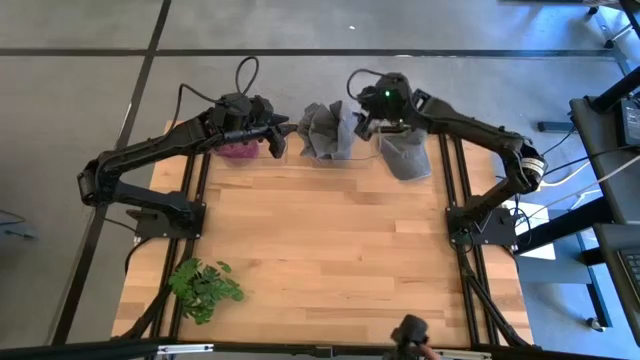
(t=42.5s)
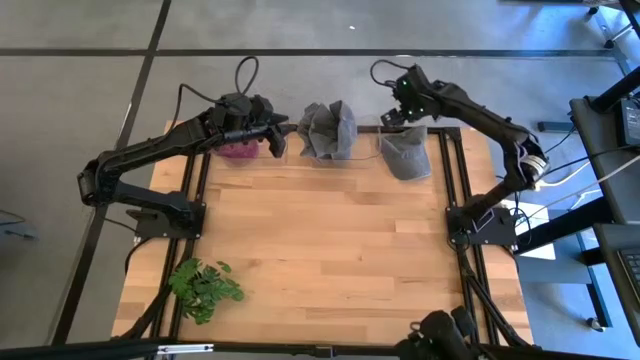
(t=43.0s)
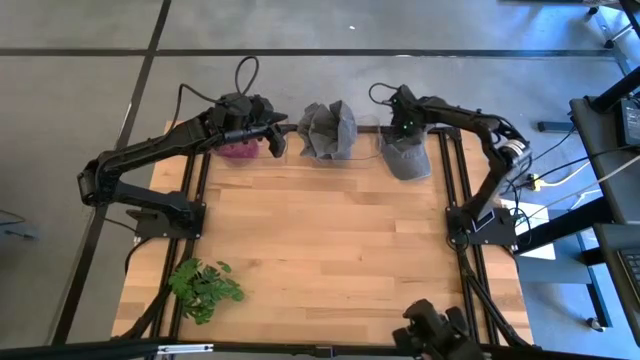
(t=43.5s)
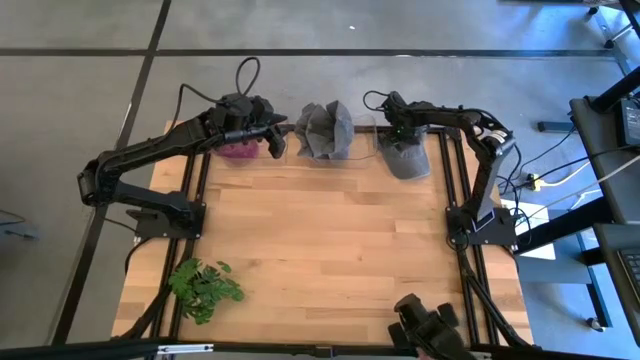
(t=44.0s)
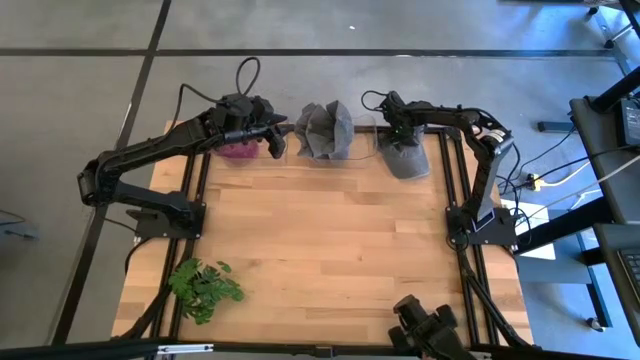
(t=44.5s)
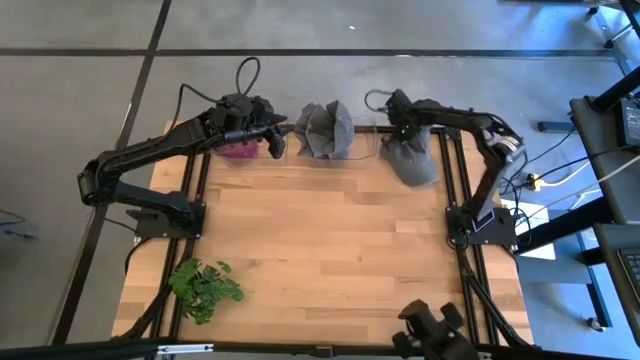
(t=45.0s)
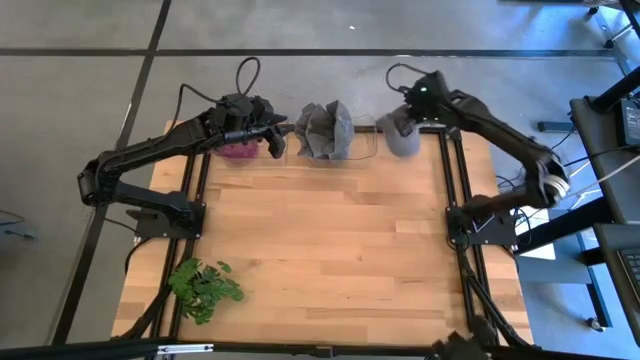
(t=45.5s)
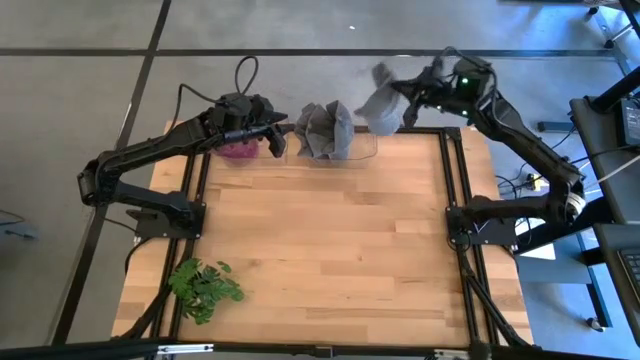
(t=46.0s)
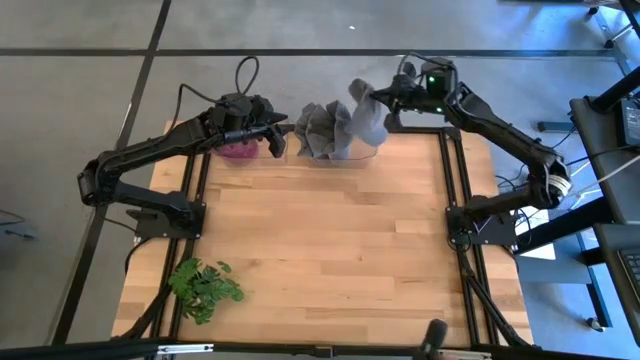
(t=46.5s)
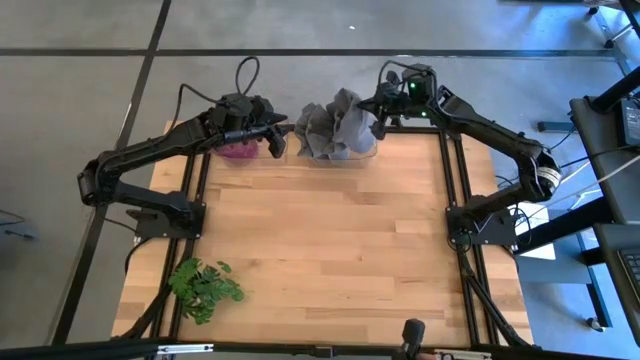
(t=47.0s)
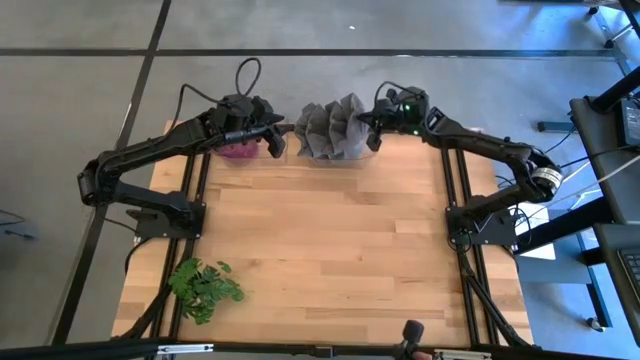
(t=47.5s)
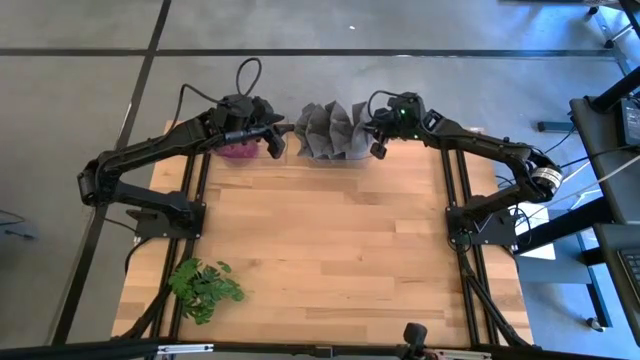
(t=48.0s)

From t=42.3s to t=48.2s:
Task: Pick & Place hat
Put the gray cap into the right transparent bin

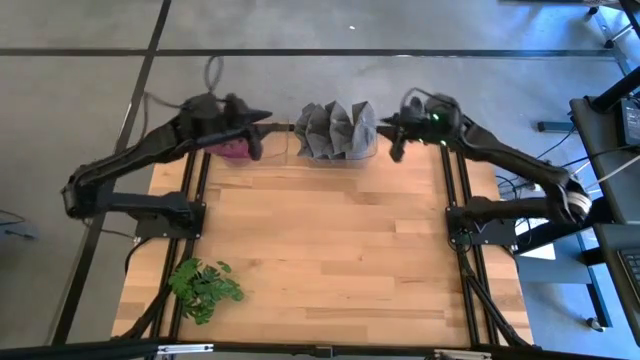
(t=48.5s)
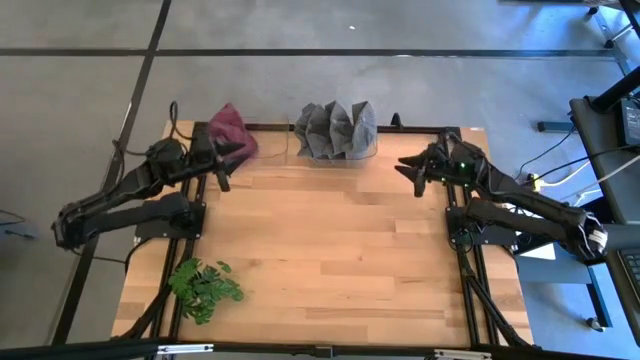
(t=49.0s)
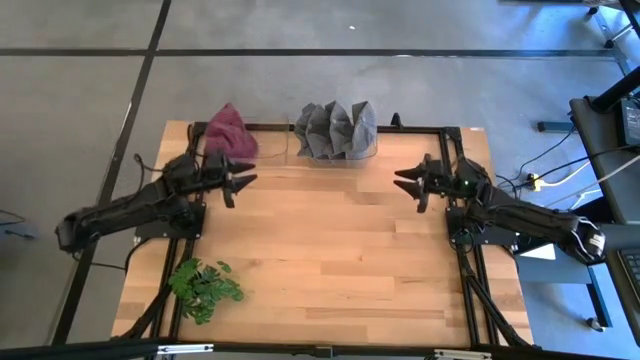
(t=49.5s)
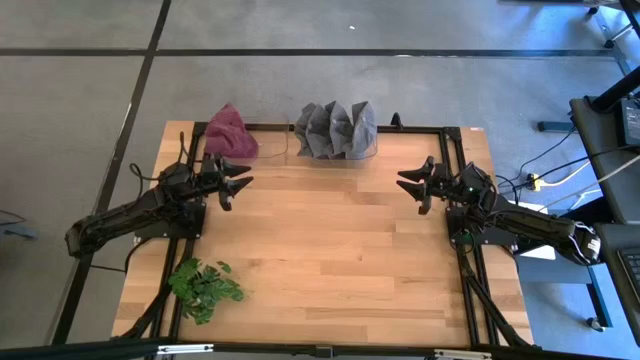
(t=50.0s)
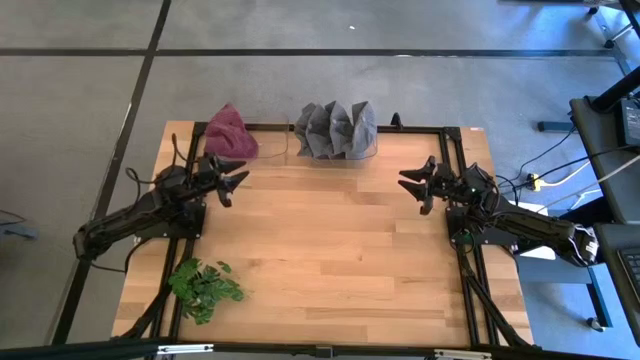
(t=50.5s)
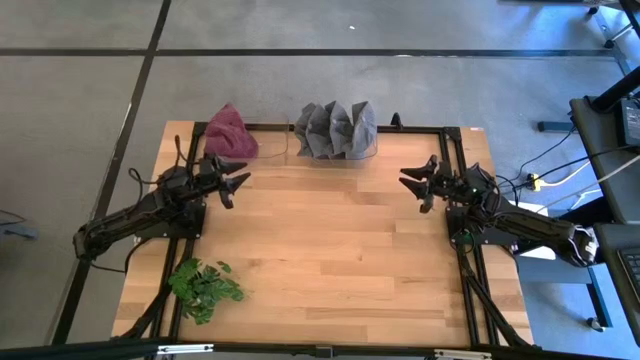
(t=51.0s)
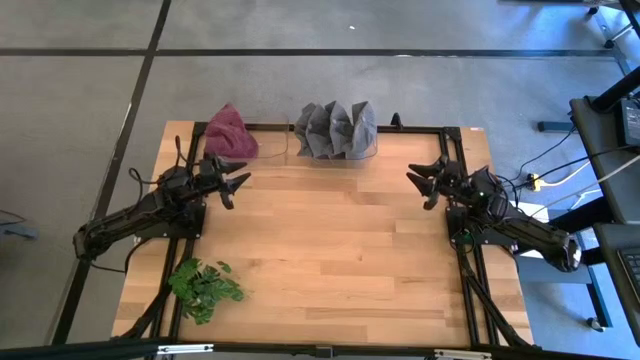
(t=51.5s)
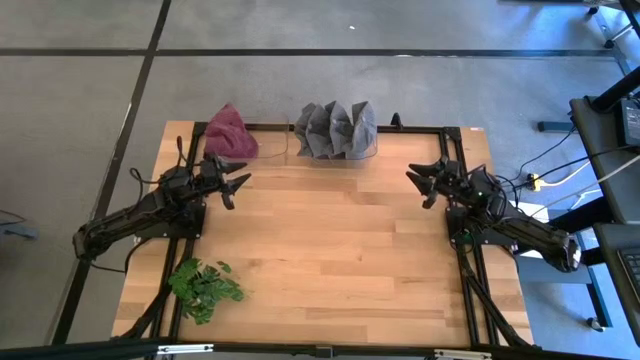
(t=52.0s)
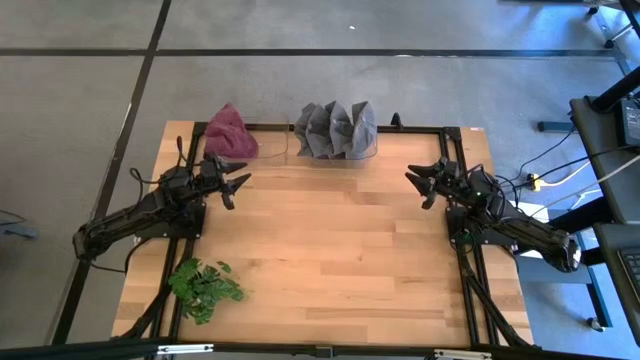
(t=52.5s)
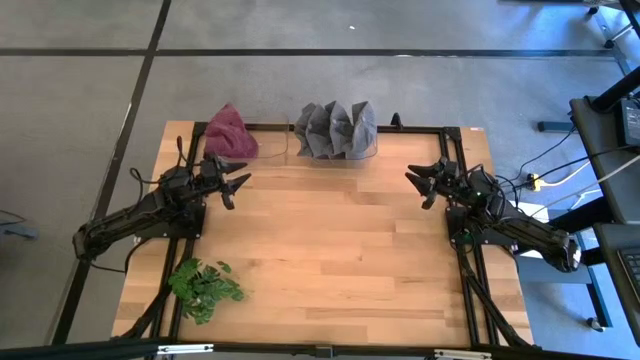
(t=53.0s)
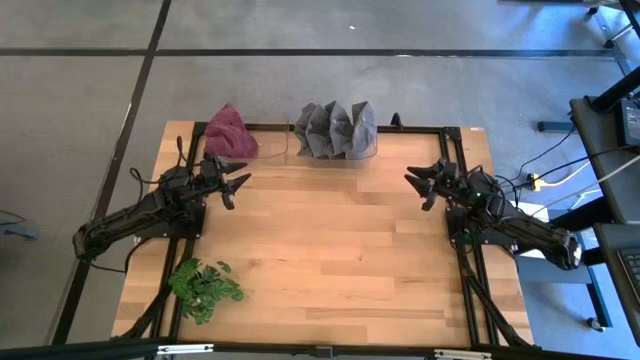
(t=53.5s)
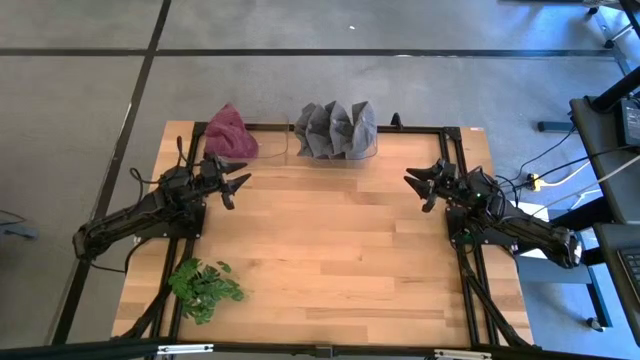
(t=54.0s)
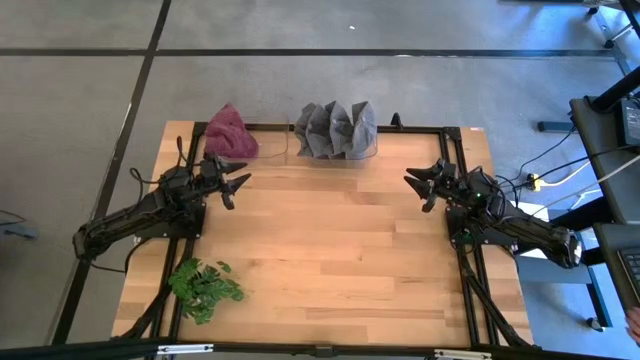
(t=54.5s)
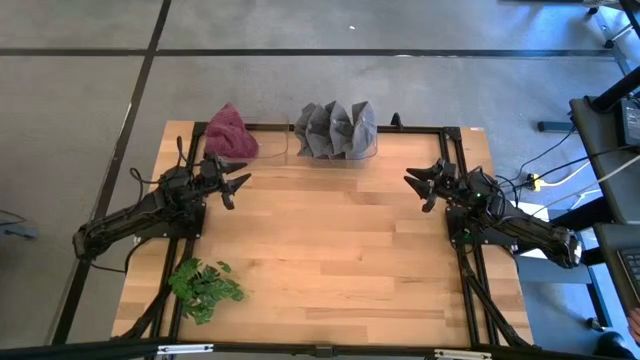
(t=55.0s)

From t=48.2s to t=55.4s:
Return to Home Position

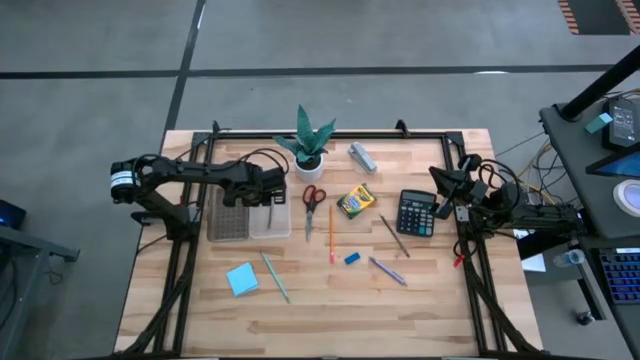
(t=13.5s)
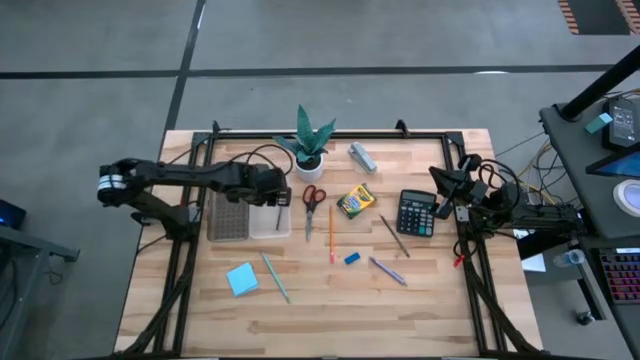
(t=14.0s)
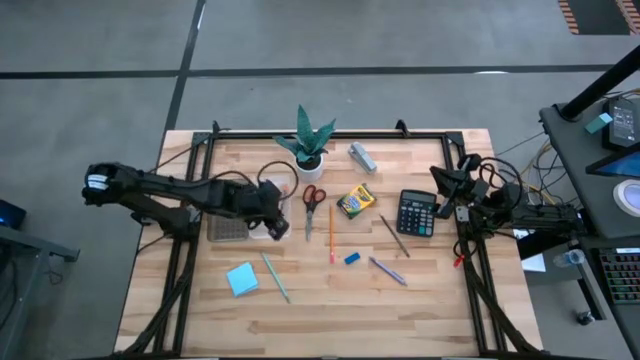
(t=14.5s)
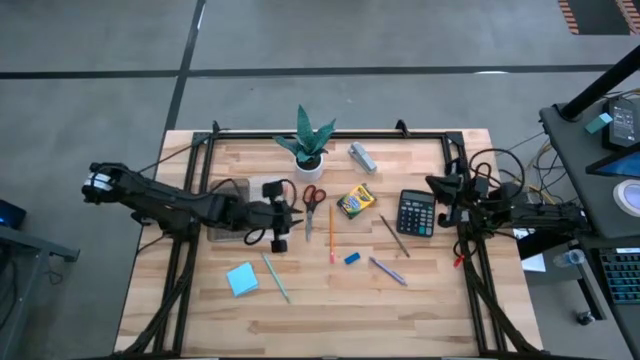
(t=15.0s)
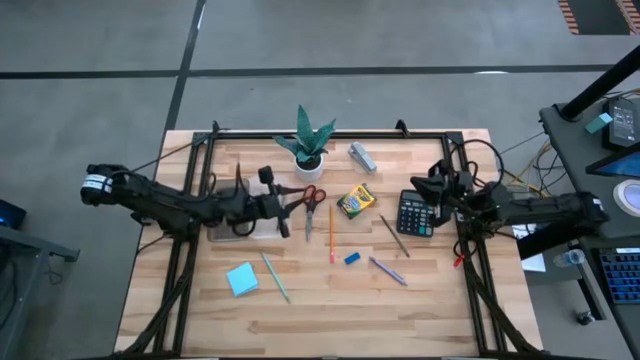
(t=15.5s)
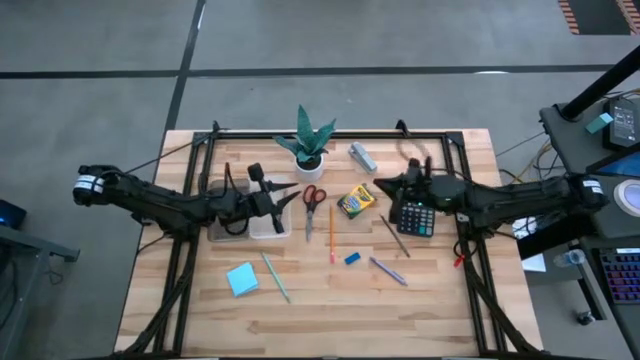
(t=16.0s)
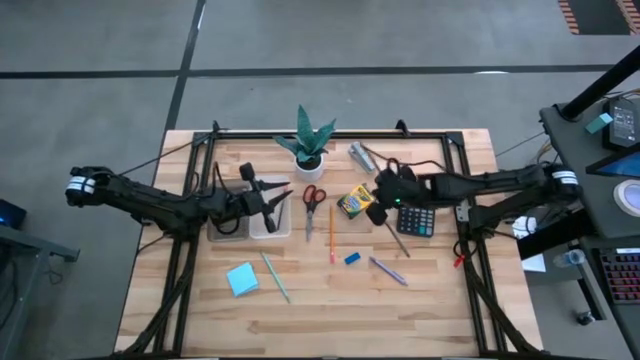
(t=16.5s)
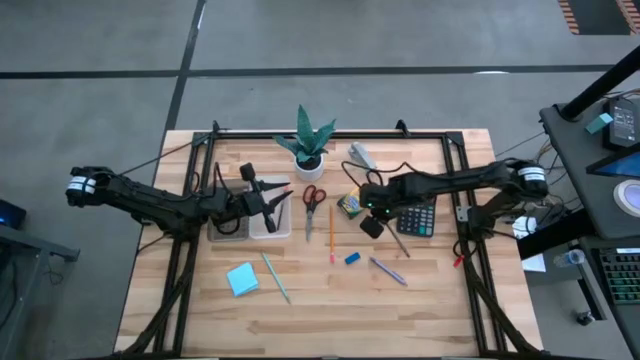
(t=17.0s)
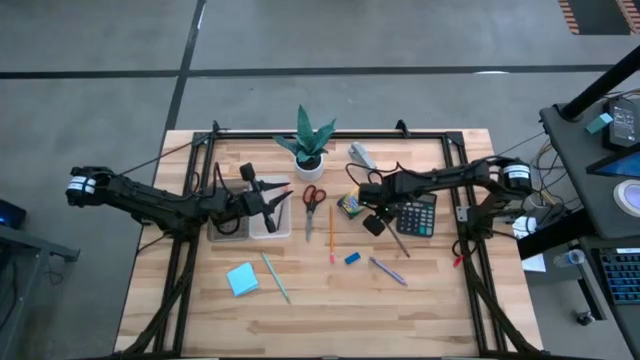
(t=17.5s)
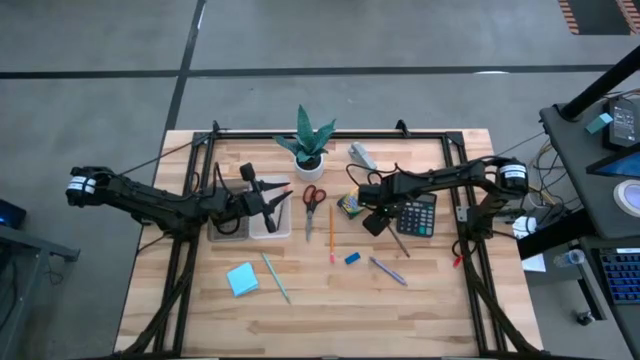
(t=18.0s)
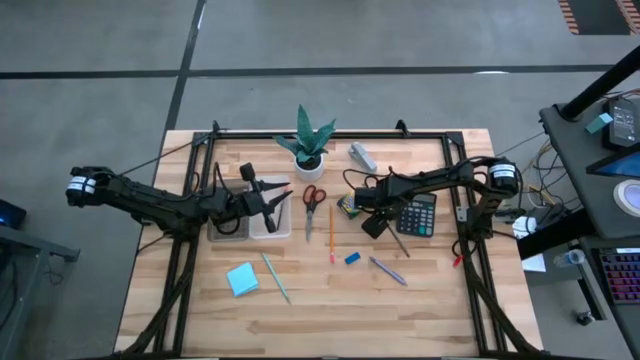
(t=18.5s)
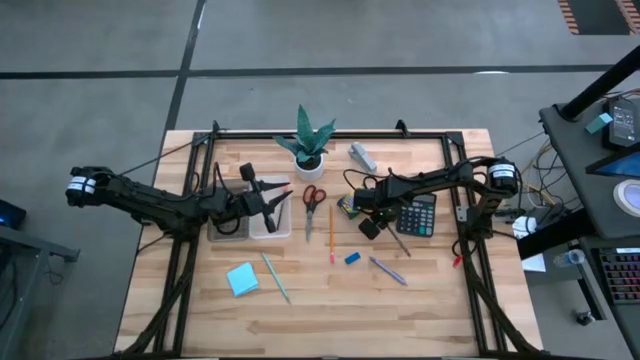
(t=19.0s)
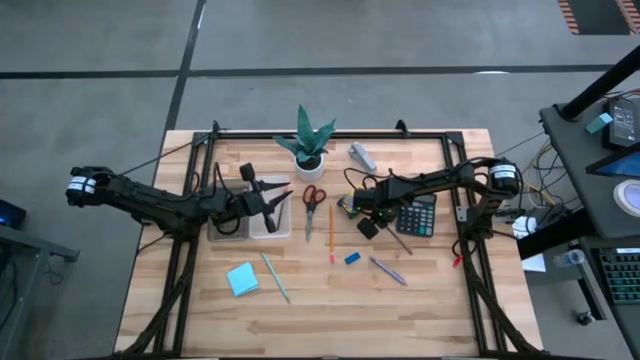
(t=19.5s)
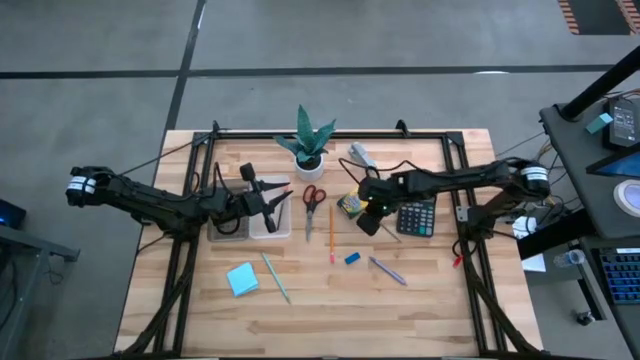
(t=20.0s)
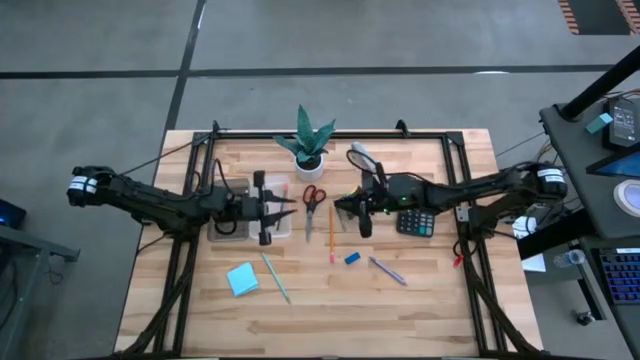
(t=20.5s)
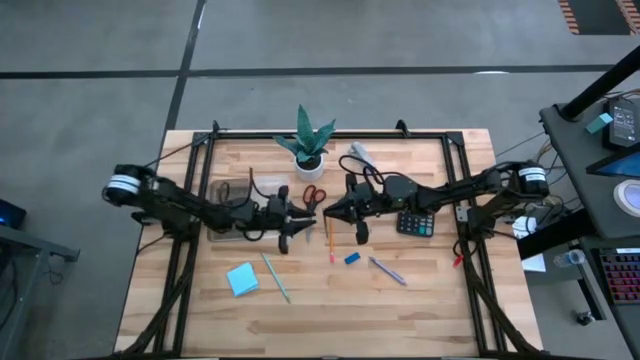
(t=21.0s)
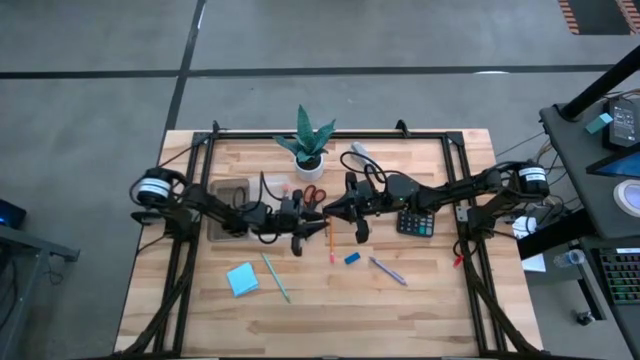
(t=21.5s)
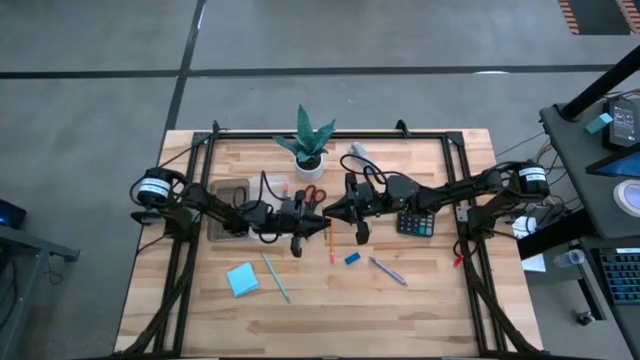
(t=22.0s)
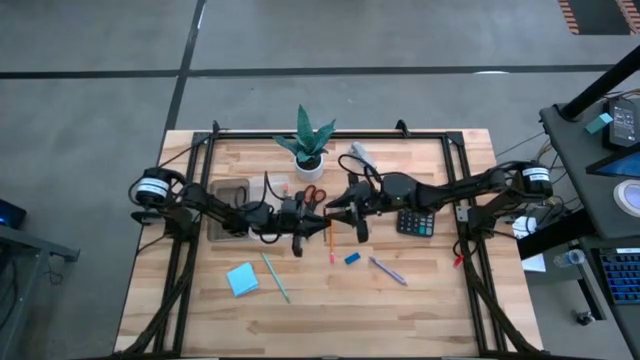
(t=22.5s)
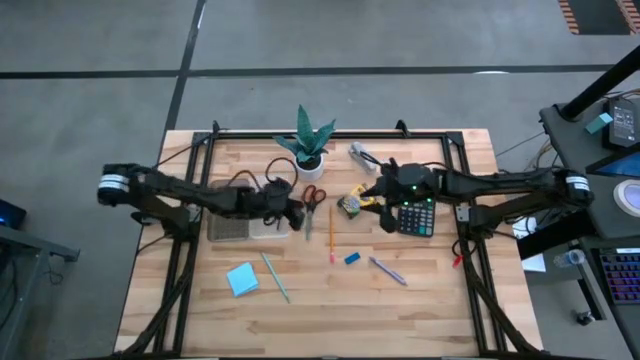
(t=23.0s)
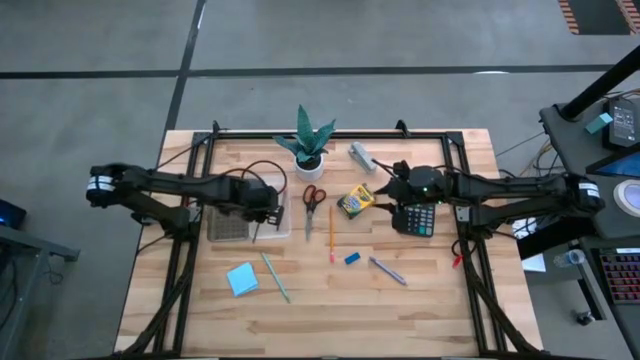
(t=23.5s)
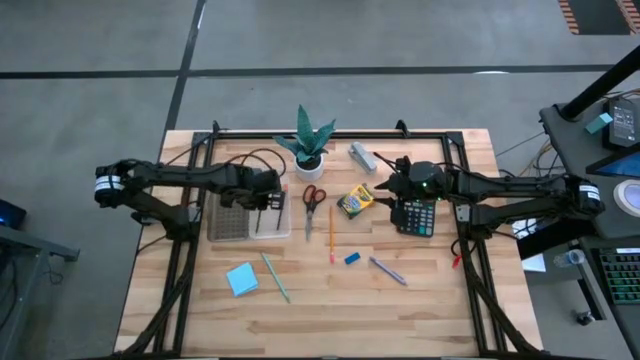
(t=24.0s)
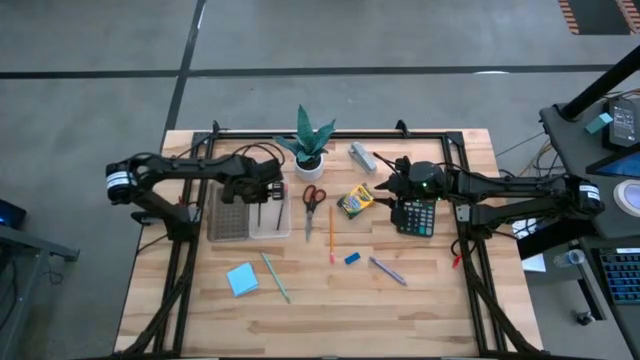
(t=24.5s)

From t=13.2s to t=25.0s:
Task: Pack school essentials
Put the black pencil into the white and black box
